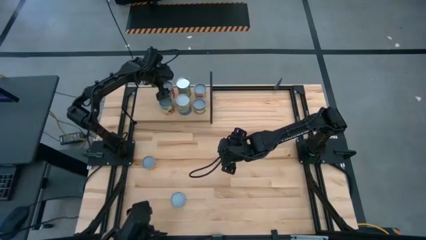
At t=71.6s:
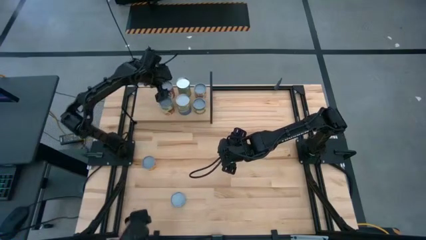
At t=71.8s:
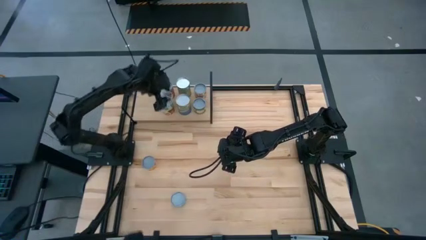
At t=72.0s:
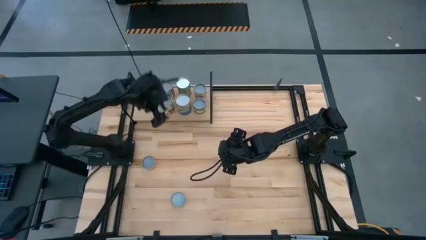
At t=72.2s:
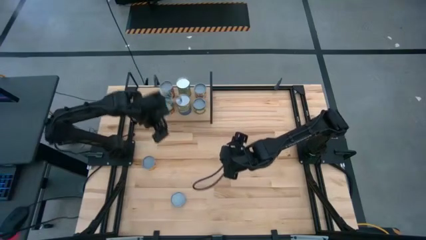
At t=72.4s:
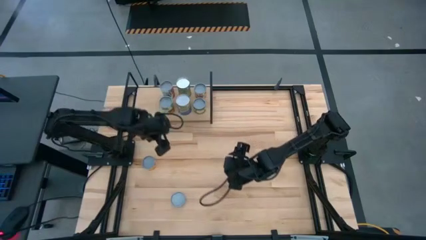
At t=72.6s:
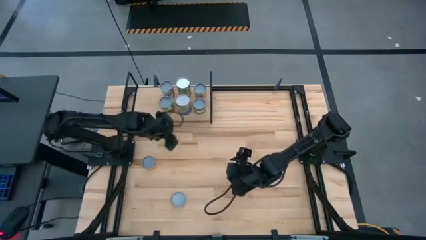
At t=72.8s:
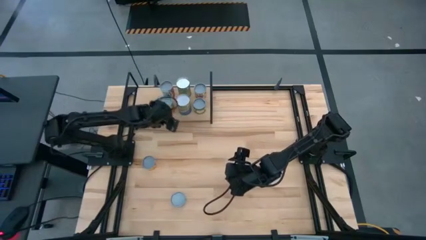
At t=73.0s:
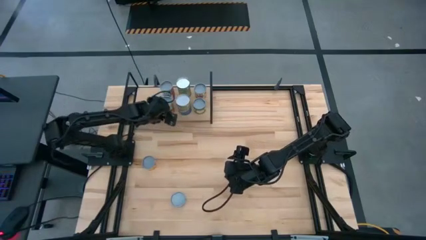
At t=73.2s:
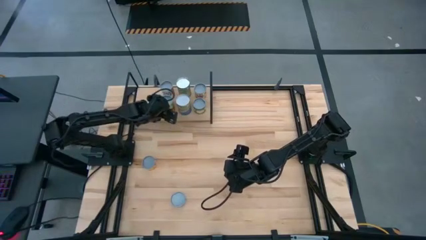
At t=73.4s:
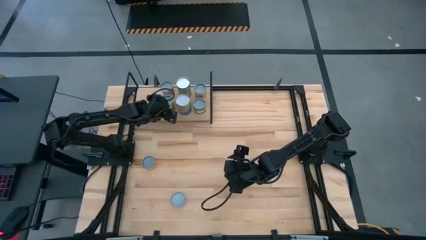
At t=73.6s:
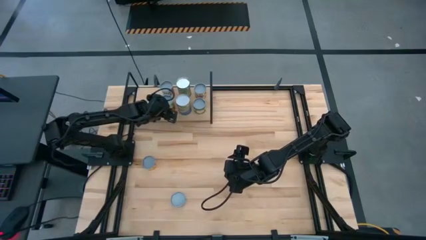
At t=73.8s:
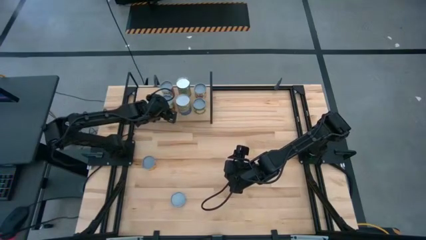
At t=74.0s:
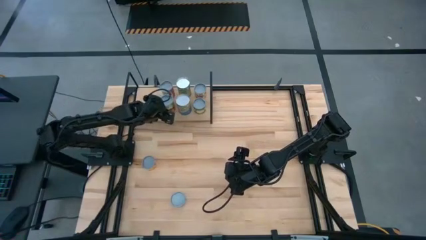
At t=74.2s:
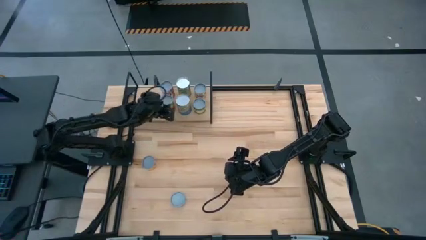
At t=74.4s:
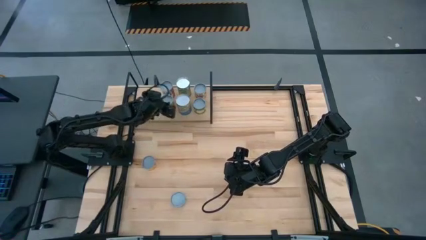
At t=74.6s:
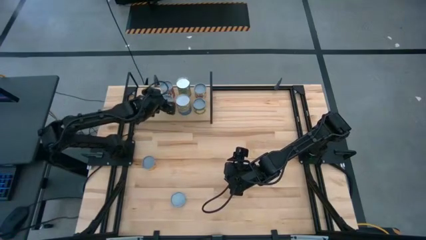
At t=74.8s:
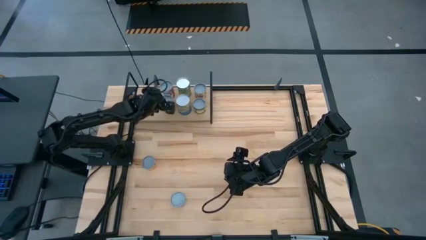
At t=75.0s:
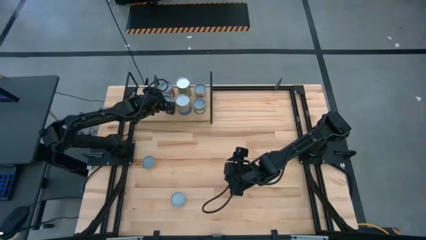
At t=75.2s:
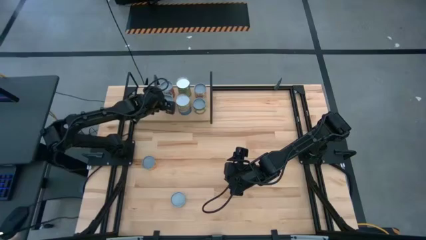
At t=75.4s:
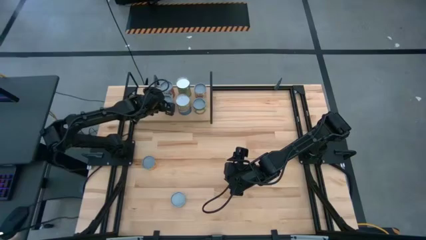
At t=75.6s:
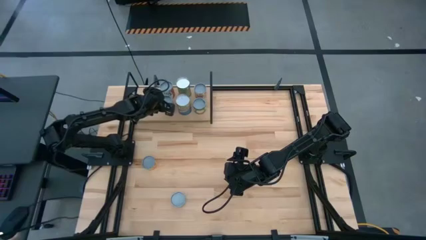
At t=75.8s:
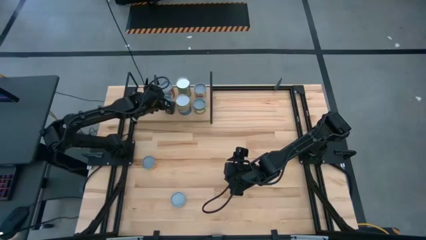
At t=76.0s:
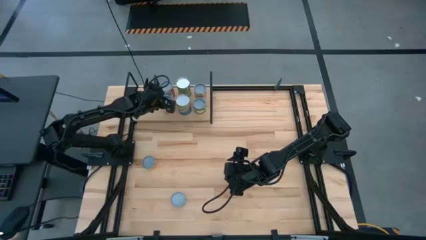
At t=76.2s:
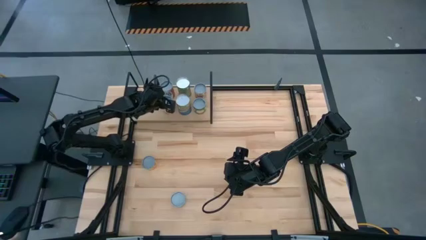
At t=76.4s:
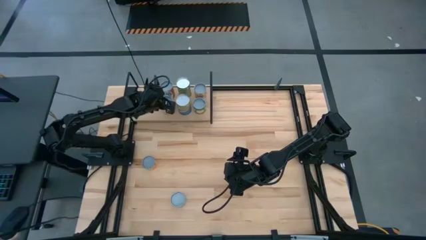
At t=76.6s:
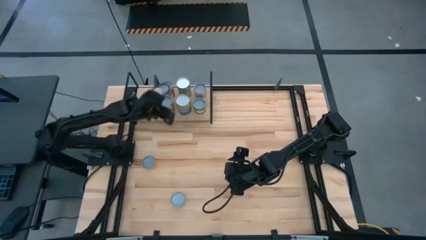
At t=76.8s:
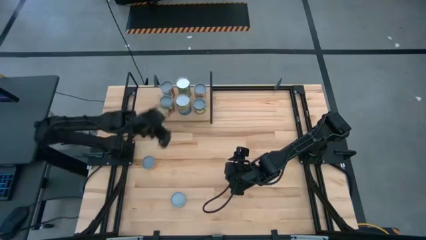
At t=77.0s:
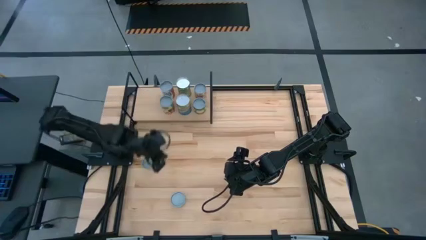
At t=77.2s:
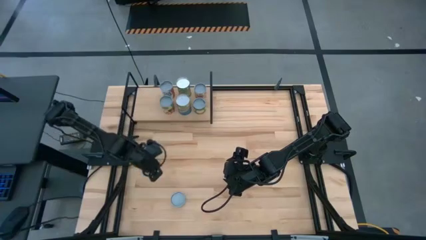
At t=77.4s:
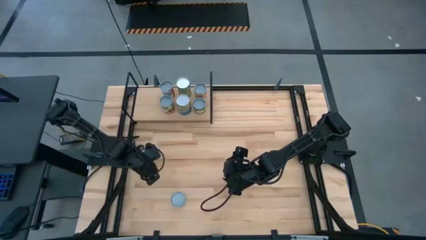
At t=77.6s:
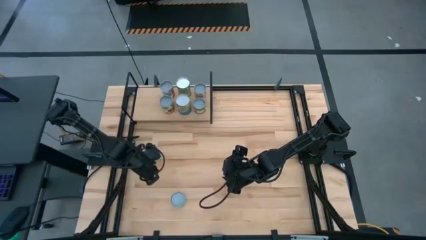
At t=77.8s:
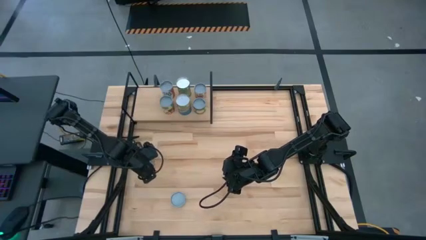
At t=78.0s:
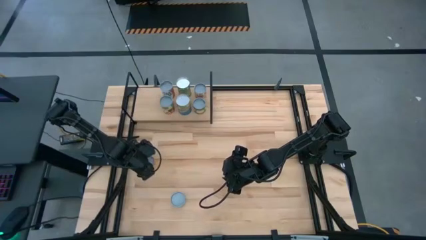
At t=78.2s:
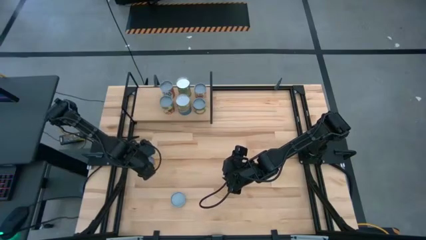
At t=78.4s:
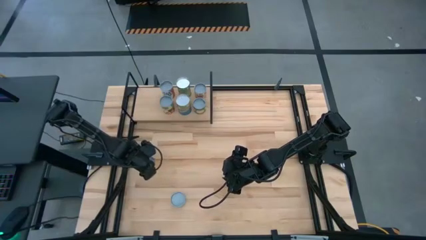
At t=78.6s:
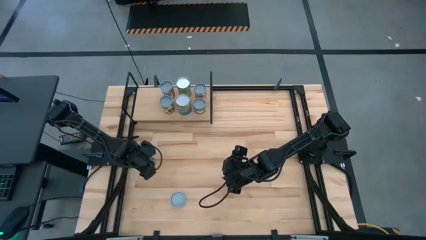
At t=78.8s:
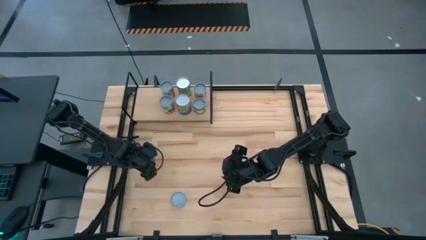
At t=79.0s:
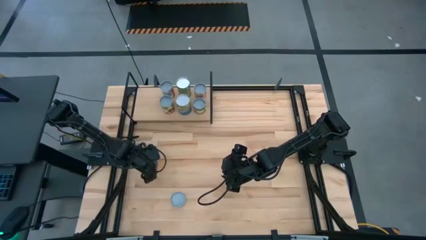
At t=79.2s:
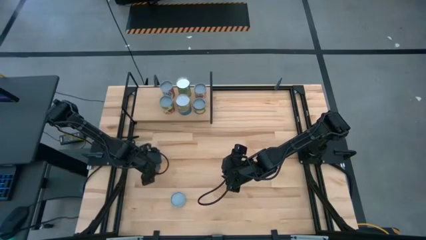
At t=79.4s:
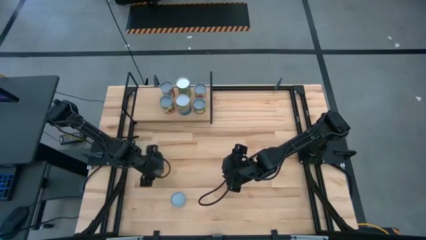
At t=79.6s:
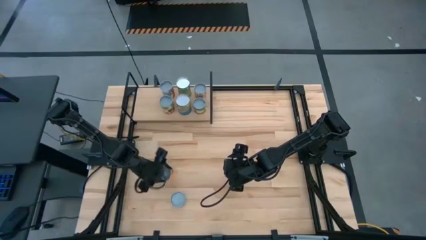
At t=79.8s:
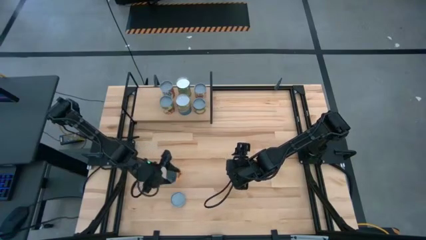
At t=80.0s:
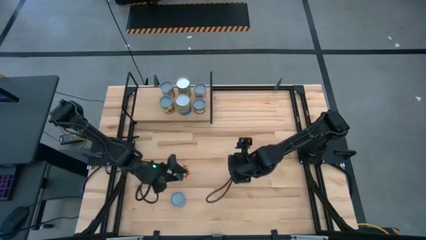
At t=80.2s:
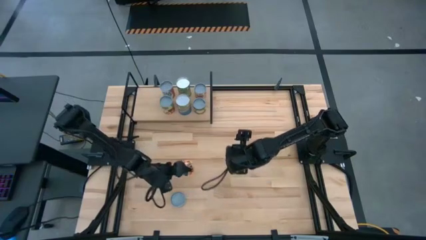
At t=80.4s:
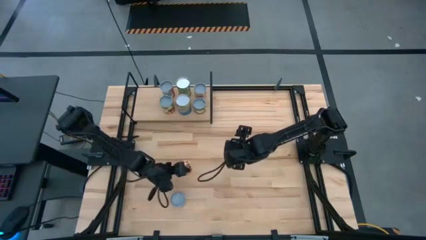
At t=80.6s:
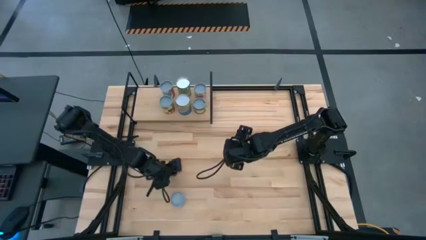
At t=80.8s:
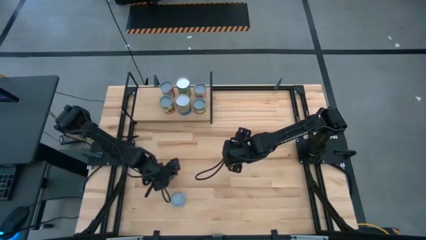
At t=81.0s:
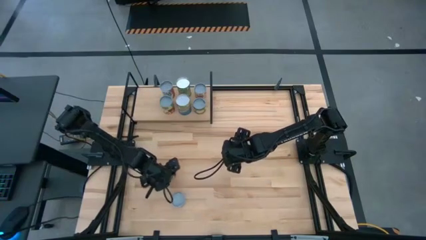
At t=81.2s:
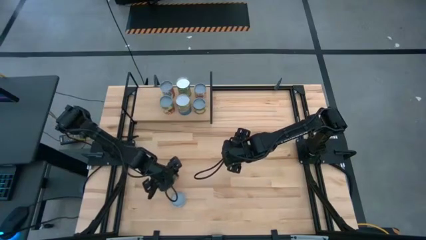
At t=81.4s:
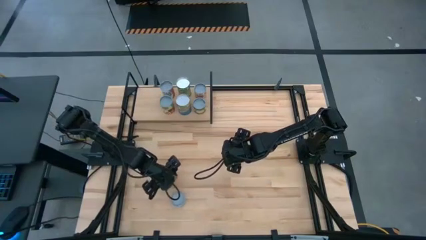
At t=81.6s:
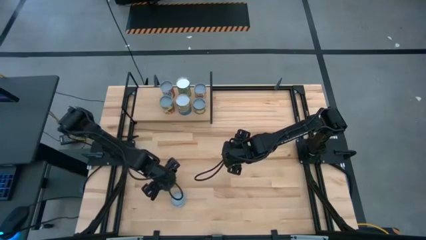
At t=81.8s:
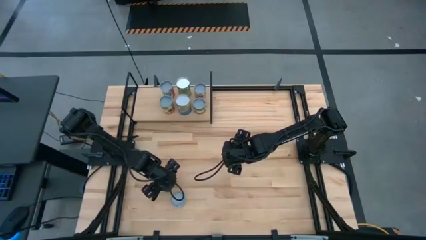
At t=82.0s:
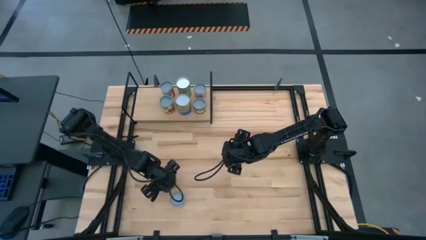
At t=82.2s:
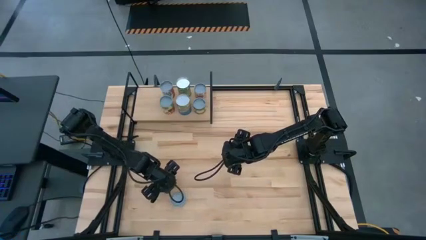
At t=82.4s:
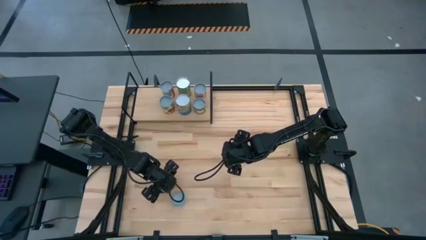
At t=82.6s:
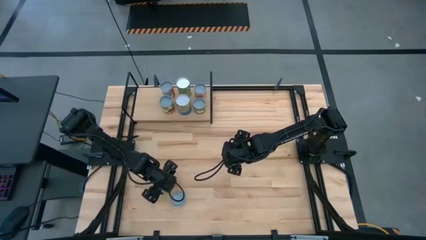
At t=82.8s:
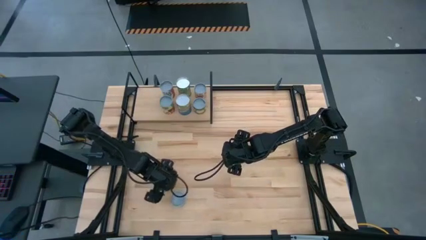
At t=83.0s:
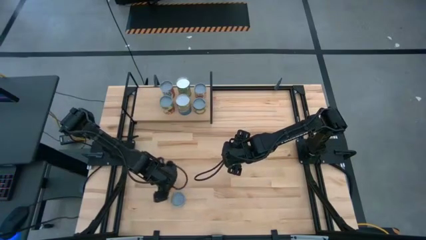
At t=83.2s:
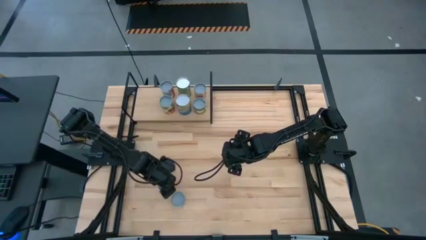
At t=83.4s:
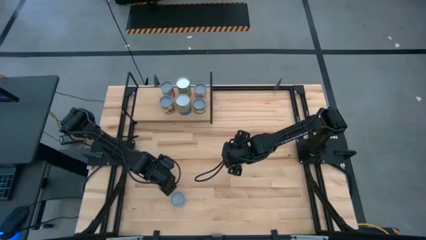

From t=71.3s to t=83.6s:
Task: Pick and place cans onto a shelf
Put the canned tomatoes on the shelf

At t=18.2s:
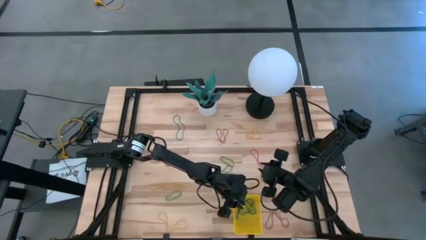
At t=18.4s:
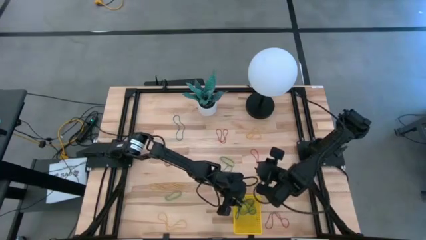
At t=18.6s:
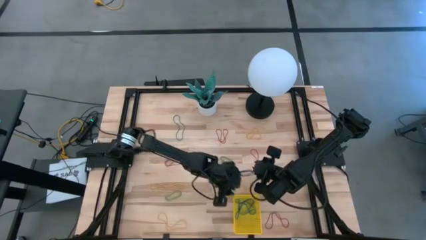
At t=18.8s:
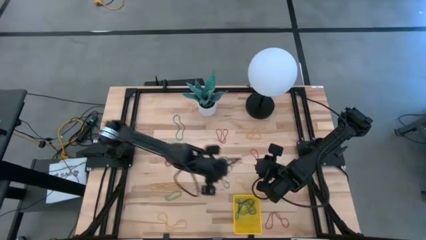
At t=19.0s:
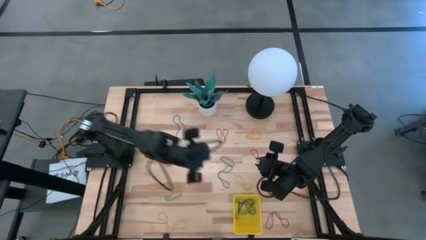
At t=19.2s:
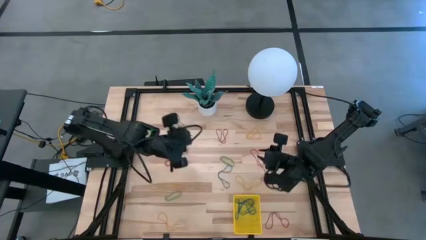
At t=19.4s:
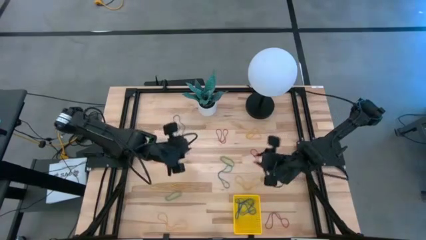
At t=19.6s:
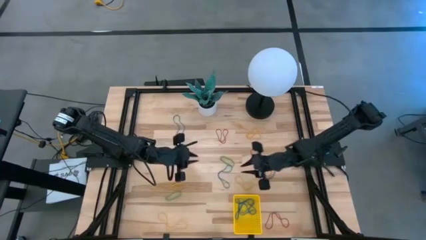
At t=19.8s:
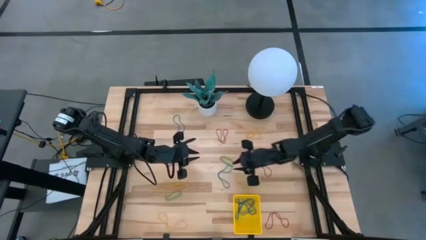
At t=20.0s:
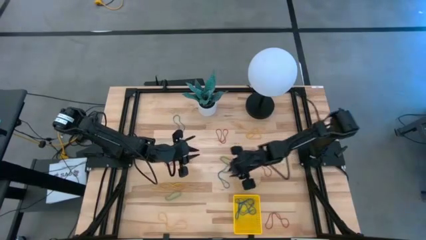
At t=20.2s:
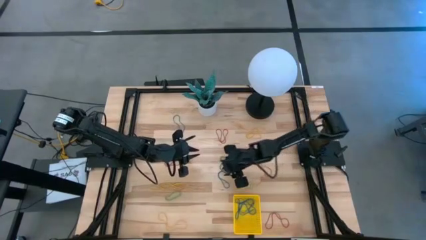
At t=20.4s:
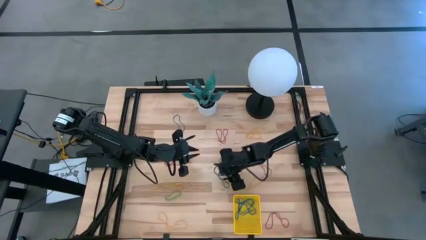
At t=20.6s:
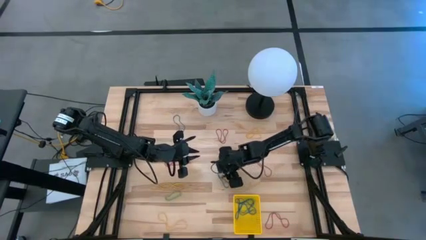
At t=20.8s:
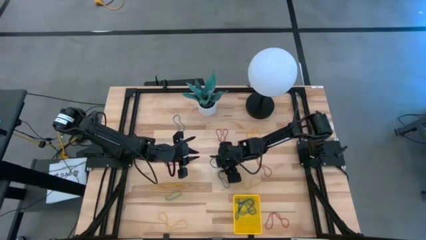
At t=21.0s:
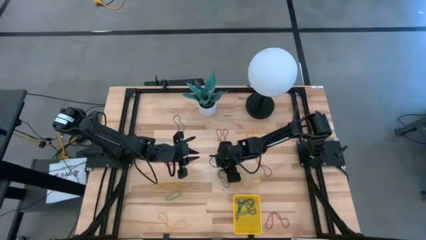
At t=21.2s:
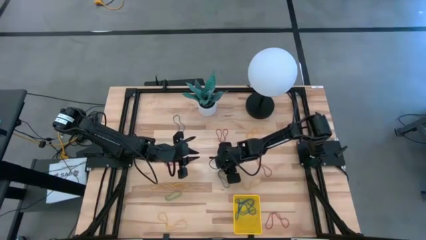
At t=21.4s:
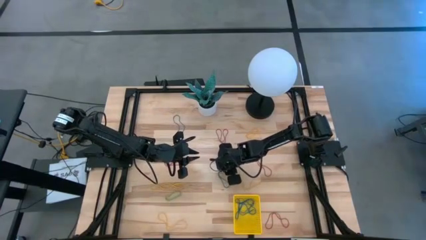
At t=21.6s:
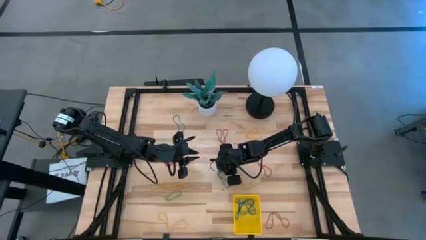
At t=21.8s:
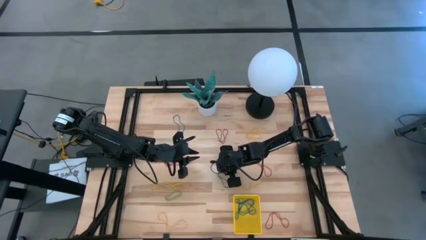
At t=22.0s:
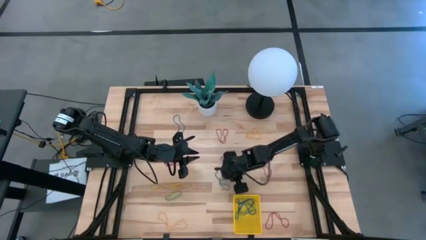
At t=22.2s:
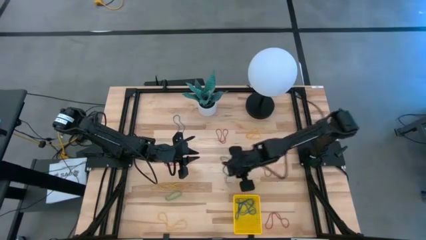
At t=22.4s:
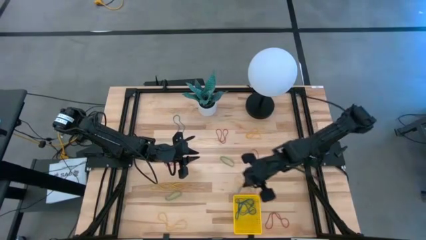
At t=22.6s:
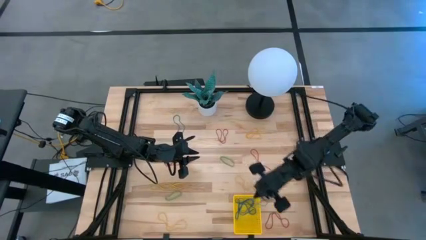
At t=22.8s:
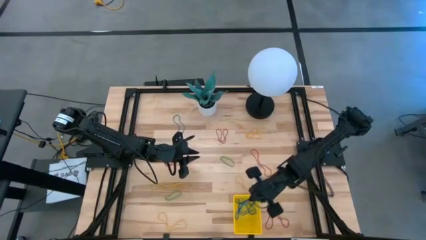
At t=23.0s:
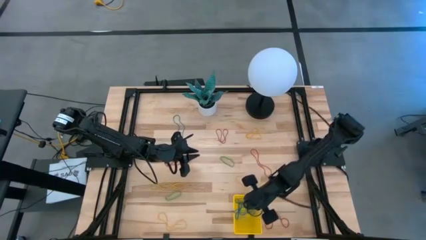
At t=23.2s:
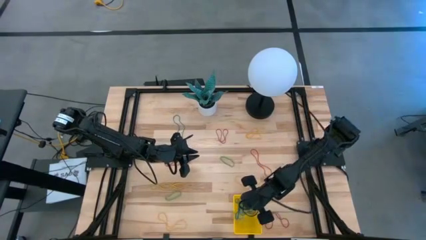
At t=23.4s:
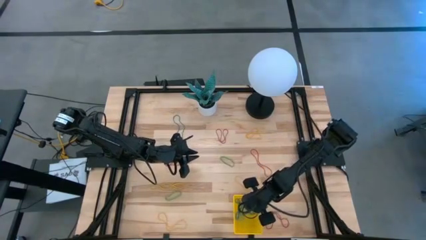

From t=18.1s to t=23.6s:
Task: Pick and place rubber bands into bin
Put the blue rubber band into the yellow basket
